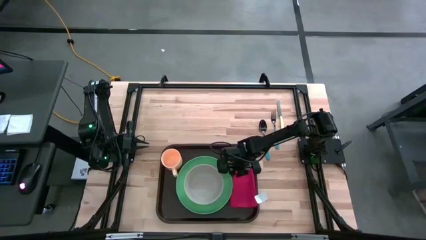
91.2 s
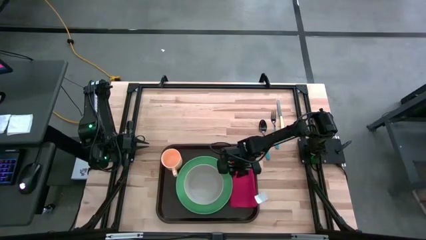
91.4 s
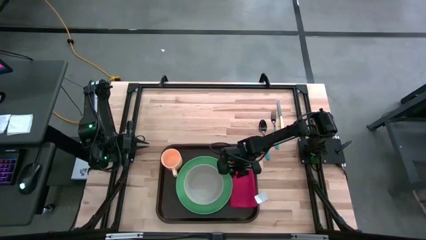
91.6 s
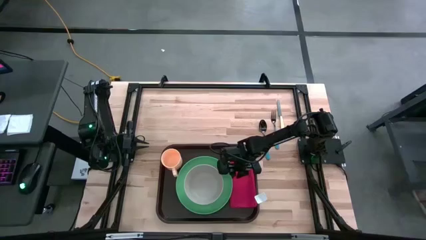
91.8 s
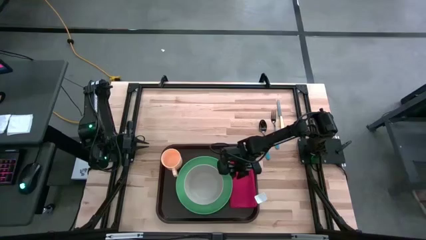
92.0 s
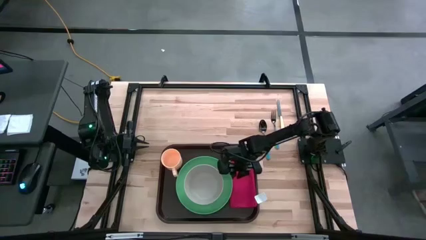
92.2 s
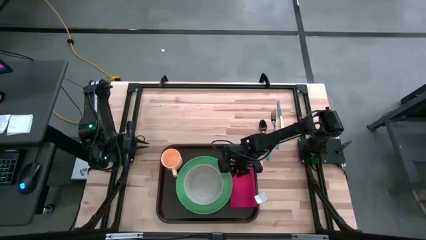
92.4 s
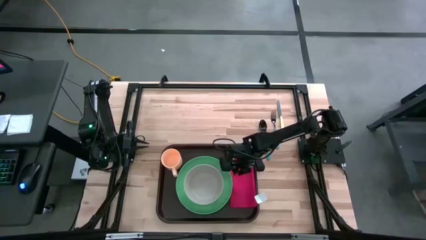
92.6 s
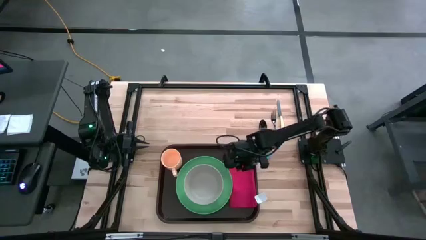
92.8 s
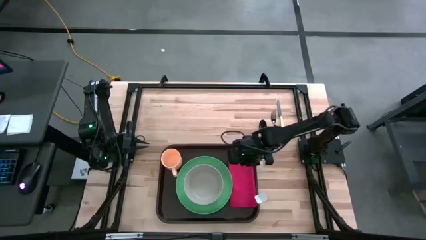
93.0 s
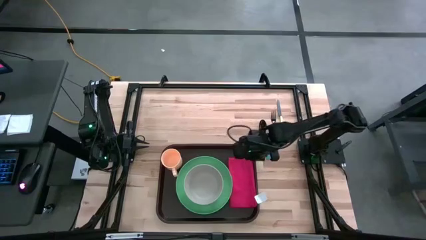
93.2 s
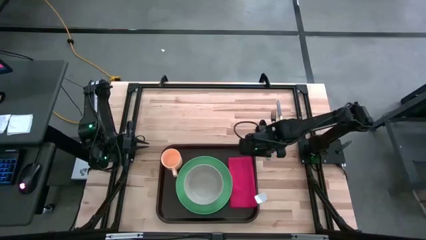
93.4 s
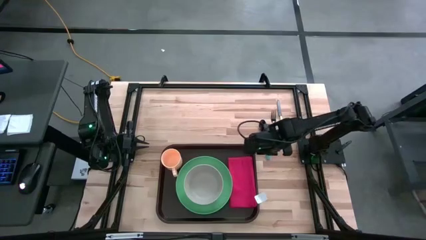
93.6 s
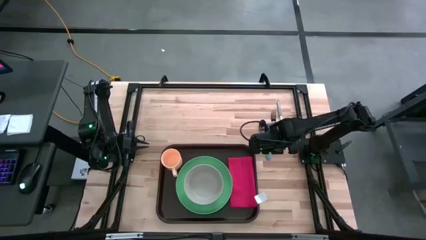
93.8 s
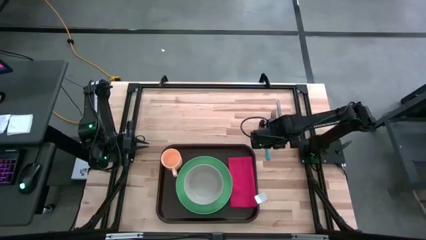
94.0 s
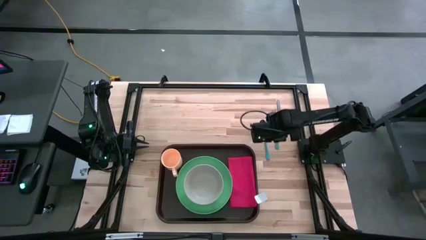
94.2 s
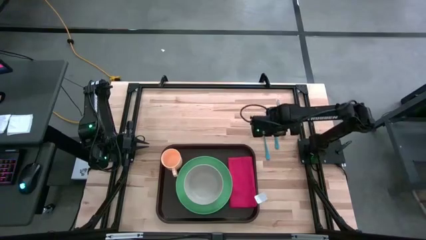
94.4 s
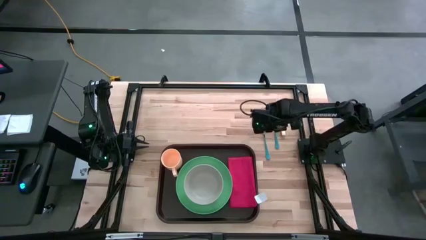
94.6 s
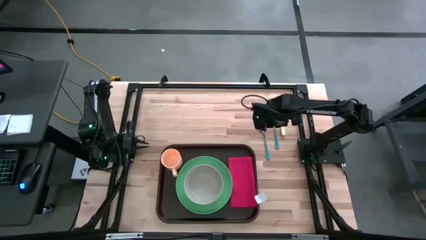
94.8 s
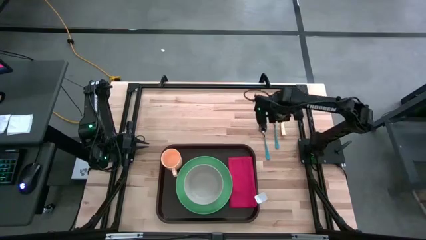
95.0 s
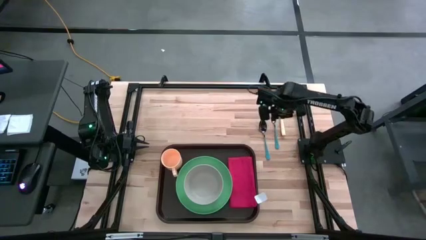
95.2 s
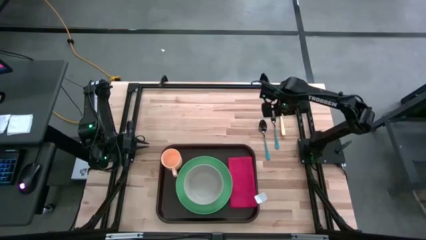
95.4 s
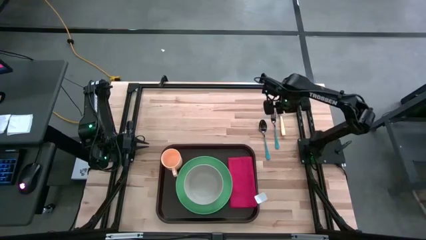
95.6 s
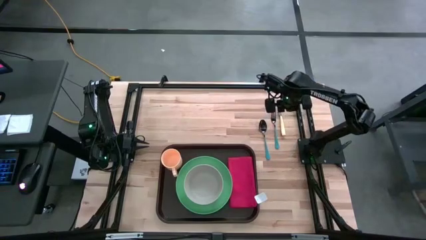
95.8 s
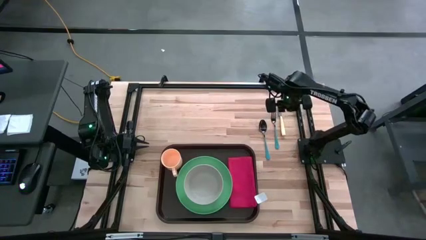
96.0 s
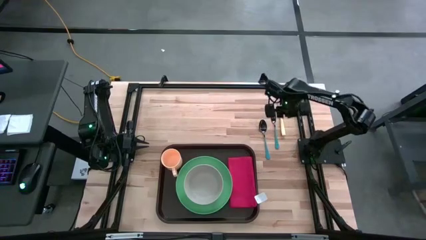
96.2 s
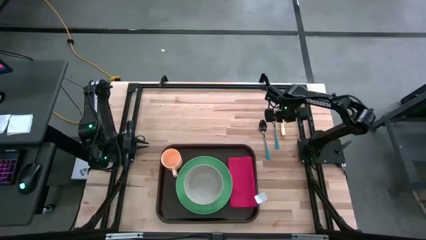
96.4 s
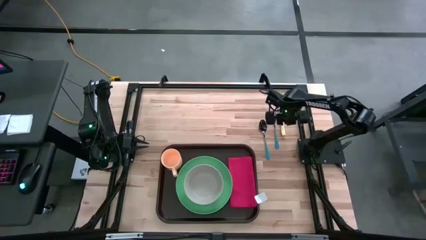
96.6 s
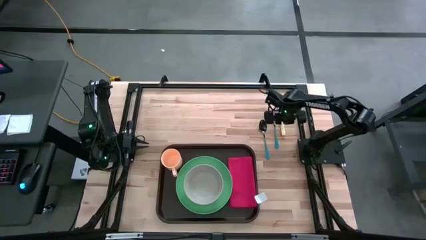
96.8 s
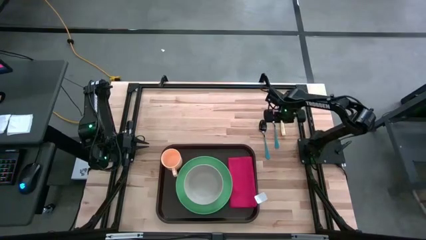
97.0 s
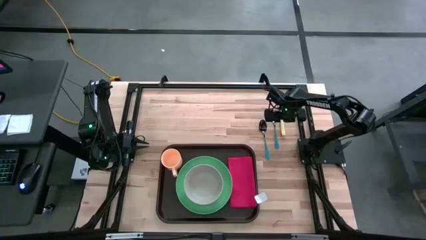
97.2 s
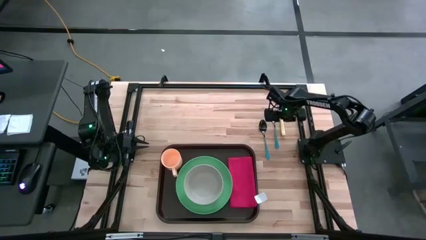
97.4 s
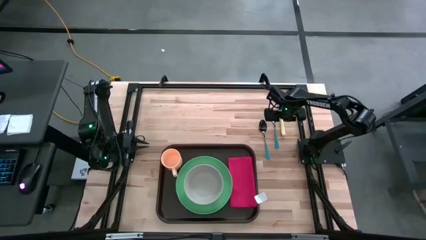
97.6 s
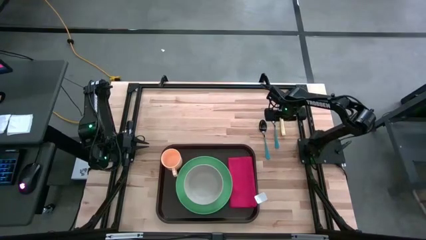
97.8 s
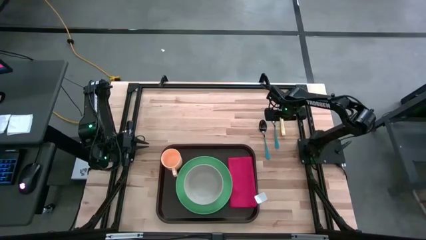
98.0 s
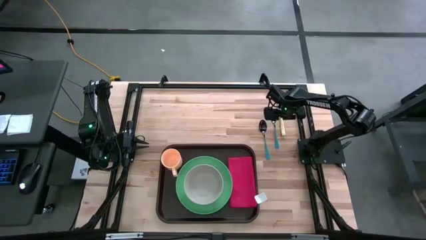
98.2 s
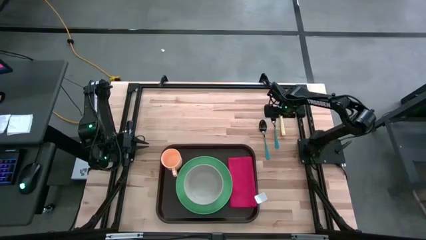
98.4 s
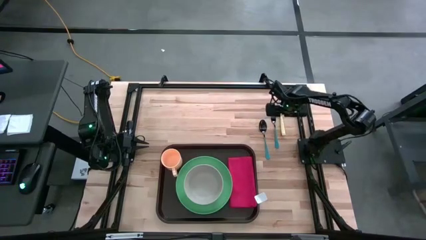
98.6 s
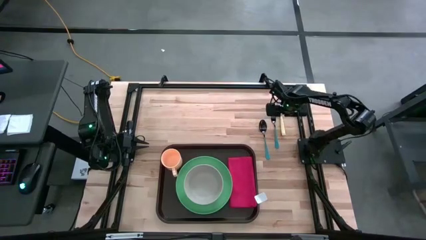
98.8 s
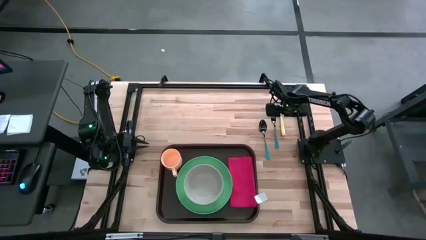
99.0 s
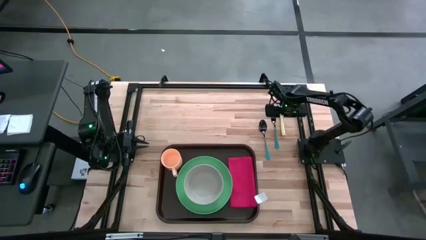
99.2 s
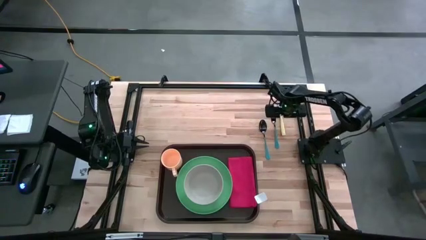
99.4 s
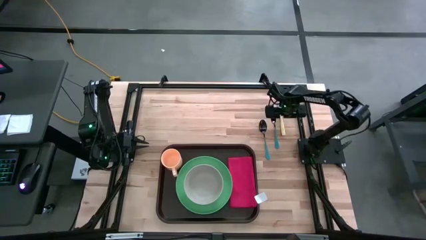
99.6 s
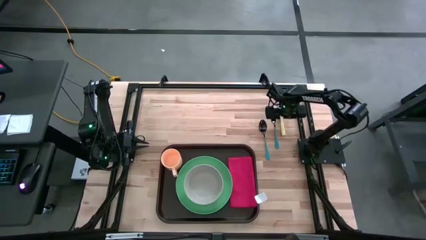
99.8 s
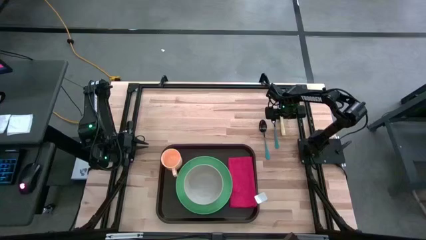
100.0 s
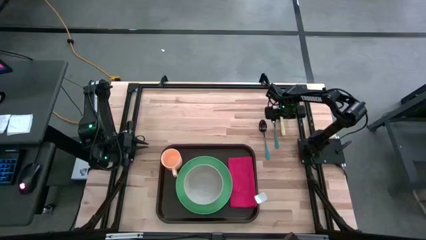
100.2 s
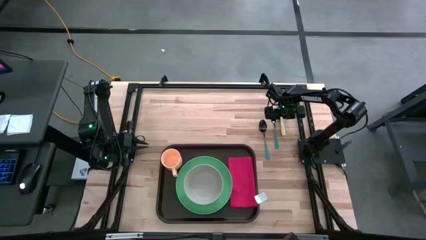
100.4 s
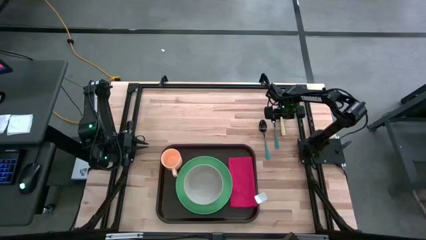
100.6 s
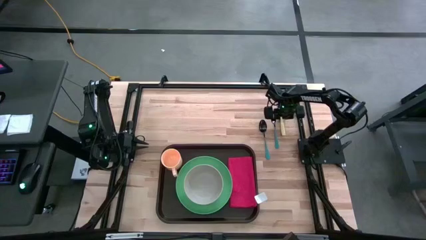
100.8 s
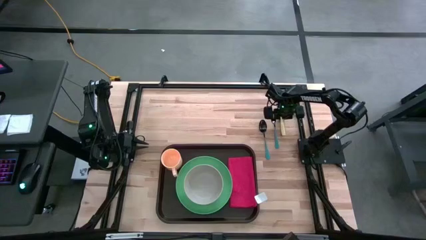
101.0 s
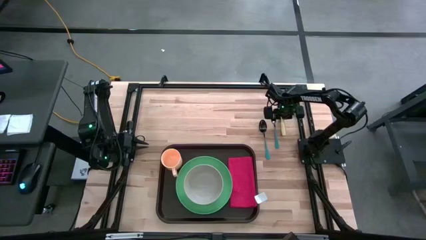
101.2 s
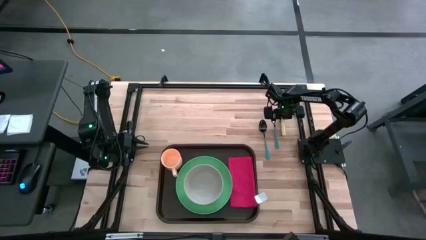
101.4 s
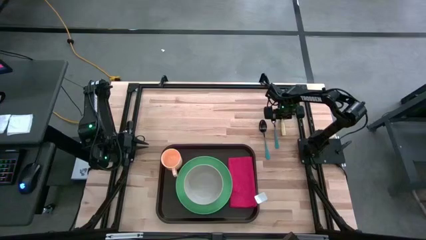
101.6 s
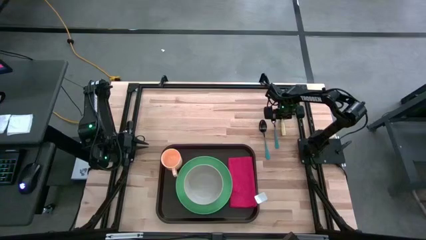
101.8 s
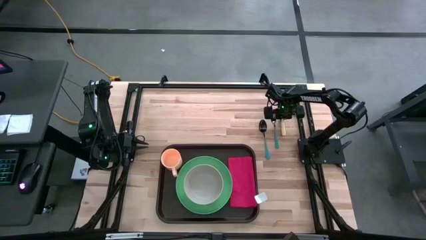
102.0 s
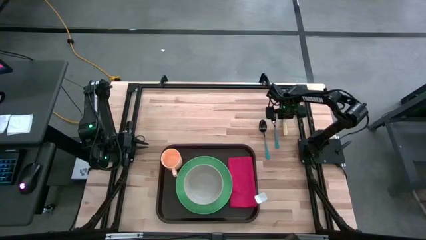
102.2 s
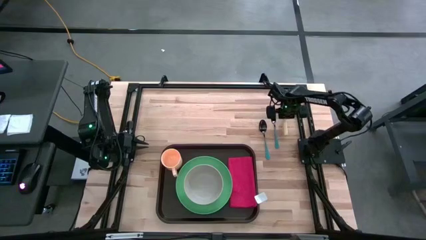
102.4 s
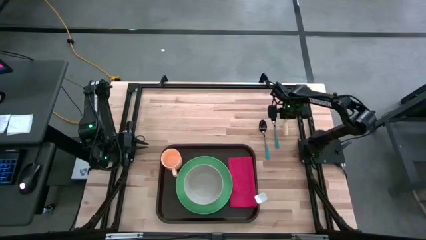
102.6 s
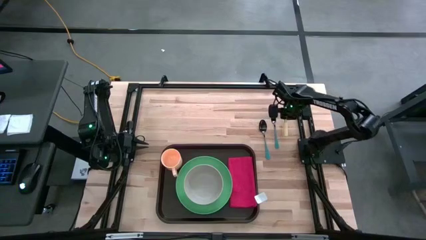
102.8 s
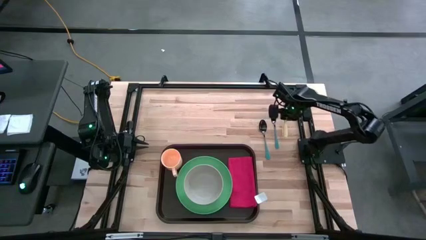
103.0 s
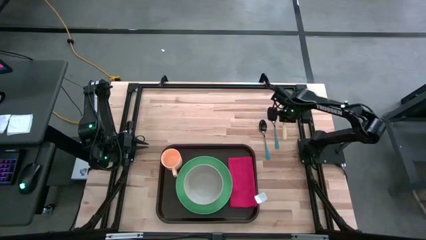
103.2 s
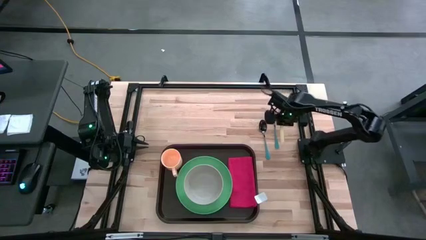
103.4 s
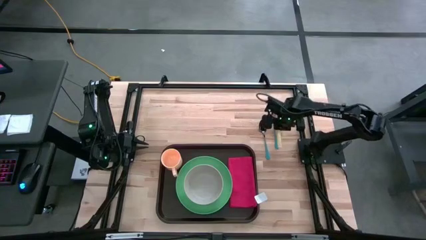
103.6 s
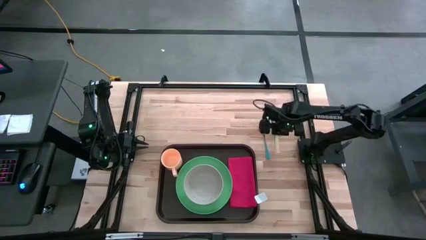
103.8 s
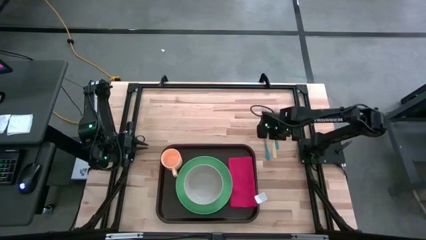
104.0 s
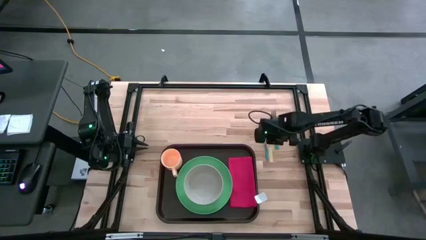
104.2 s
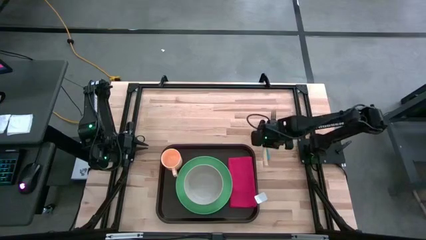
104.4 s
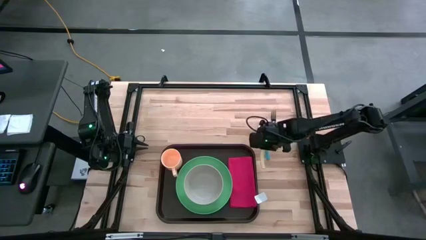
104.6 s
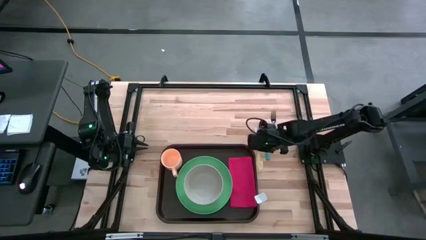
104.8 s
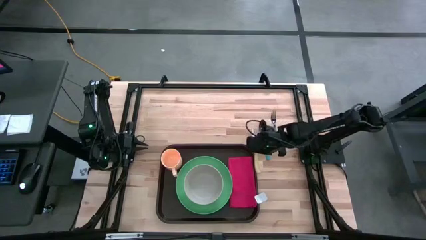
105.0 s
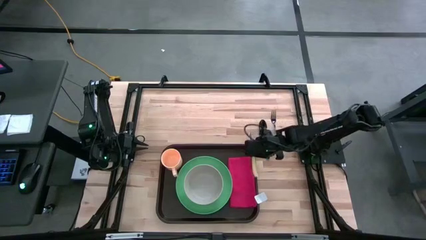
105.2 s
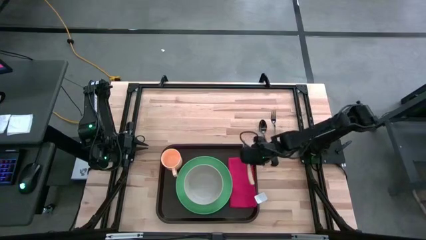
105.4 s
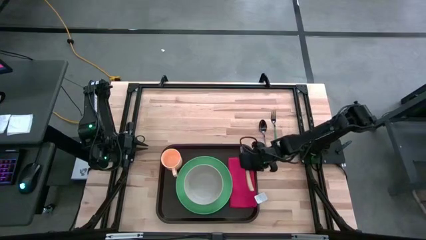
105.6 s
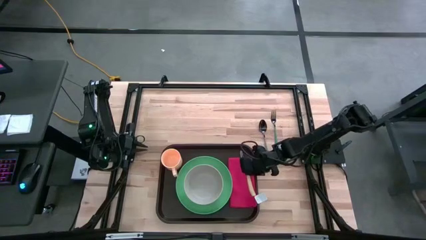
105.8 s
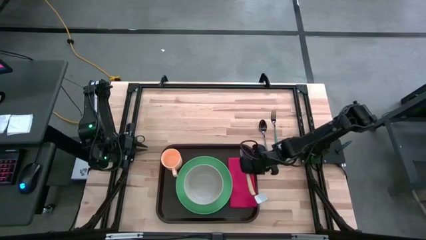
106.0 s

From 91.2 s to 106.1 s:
Task: Set up tray
Put the yellow knife on the red napkin

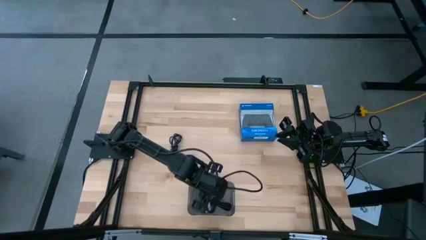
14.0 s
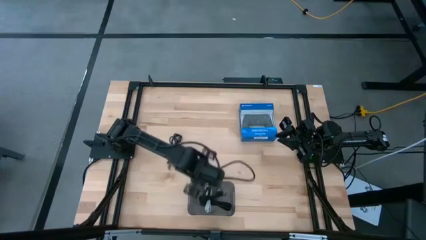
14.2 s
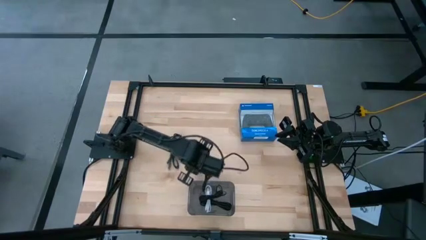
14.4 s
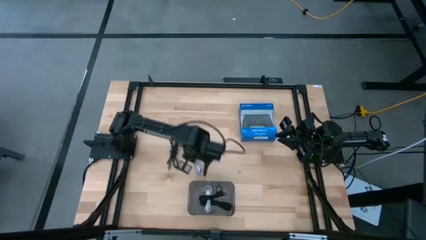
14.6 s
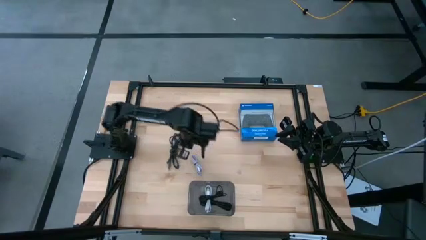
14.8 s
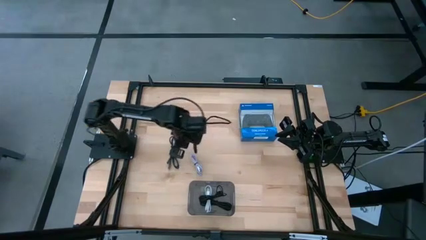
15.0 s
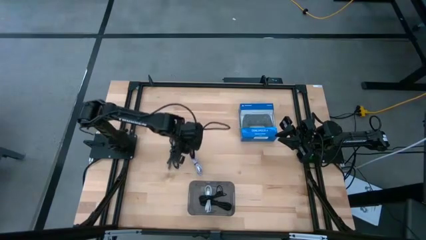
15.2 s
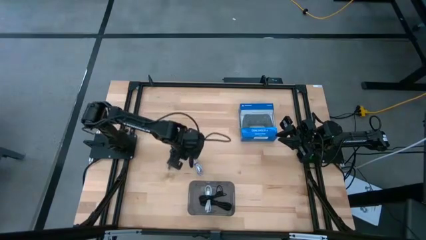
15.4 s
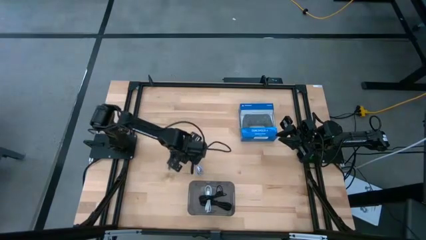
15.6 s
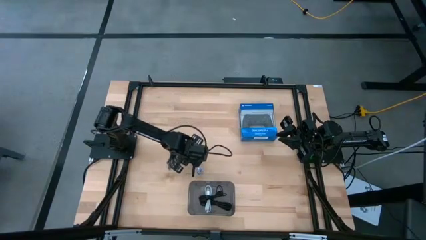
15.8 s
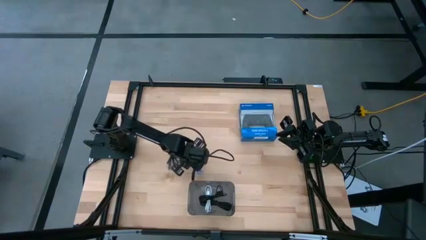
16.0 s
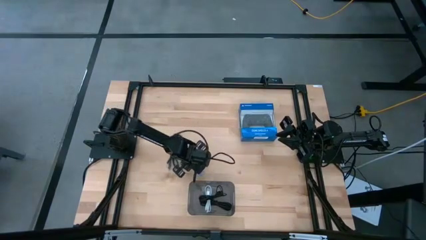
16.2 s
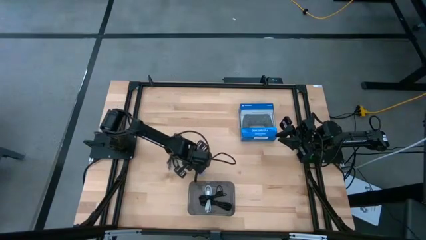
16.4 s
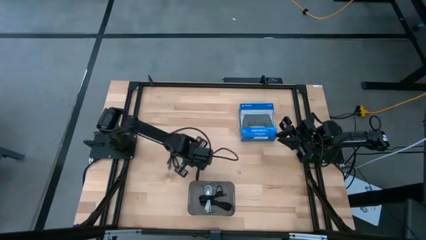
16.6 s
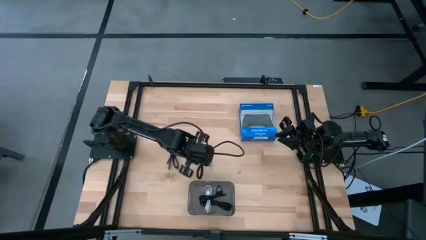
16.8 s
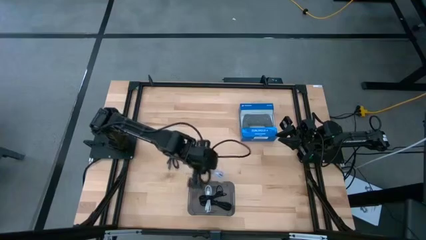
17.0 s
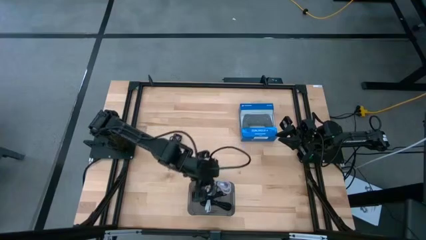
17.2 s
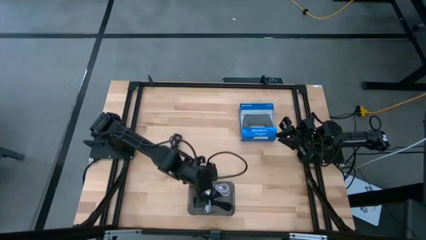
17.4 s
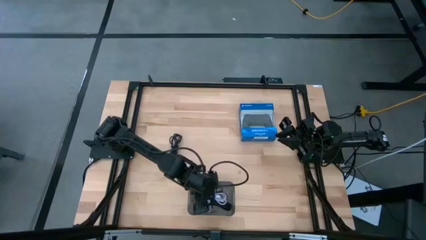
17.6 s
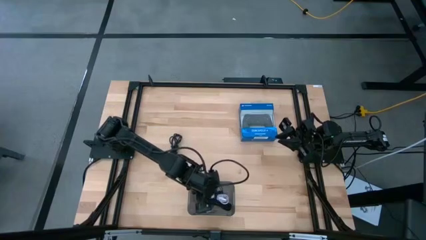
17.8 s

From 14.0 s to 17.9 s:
Task: Pick and place USB-C Cables
Put the white charger cable into the black bin
